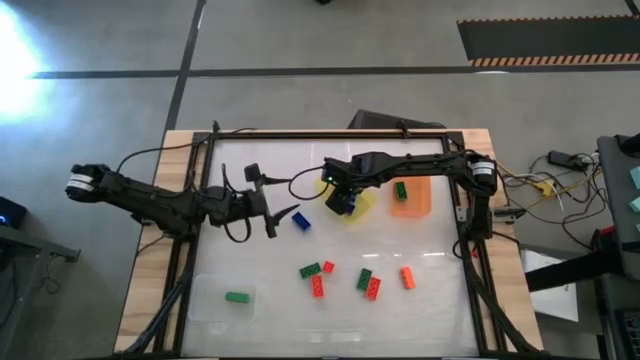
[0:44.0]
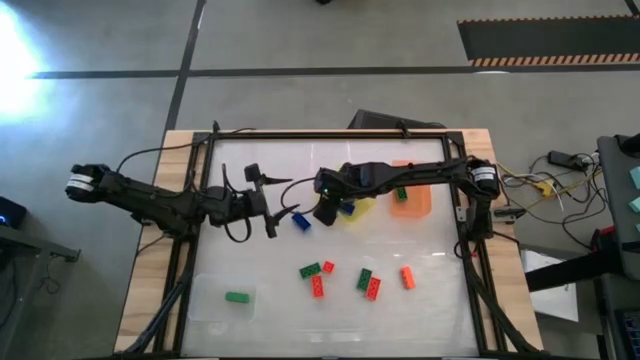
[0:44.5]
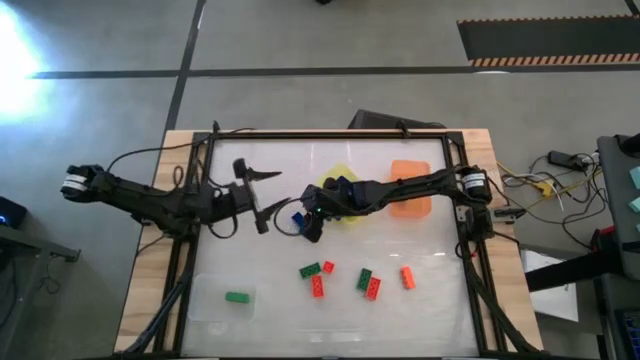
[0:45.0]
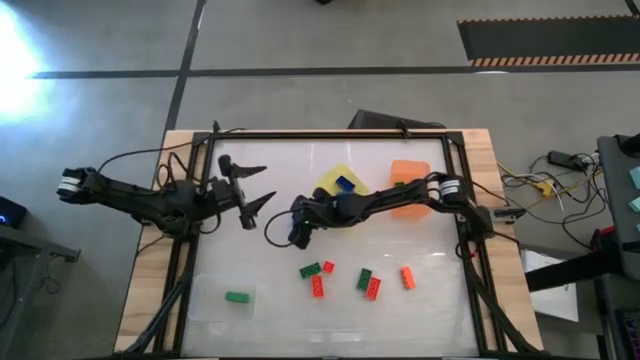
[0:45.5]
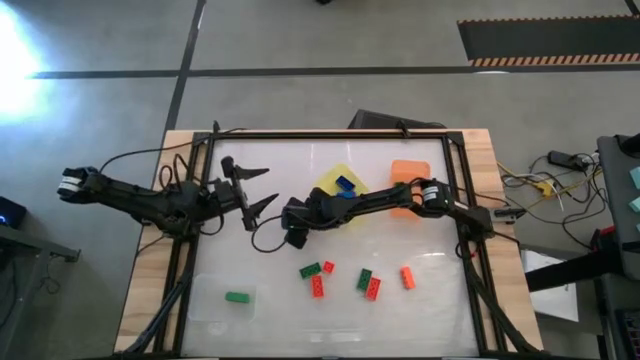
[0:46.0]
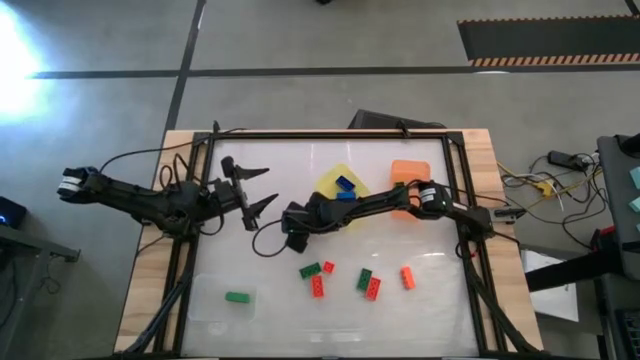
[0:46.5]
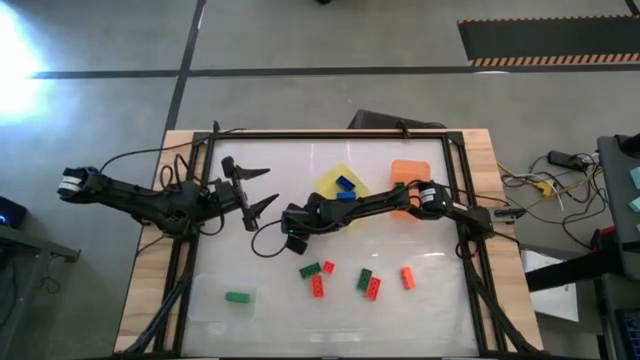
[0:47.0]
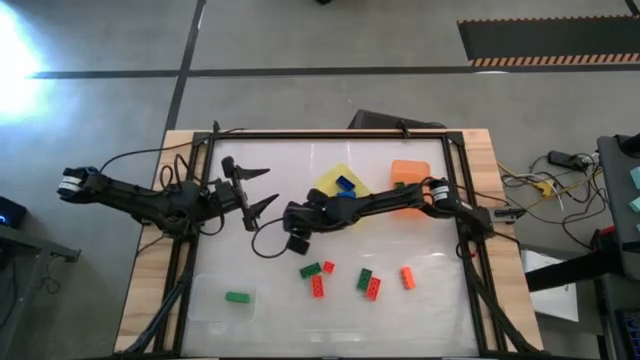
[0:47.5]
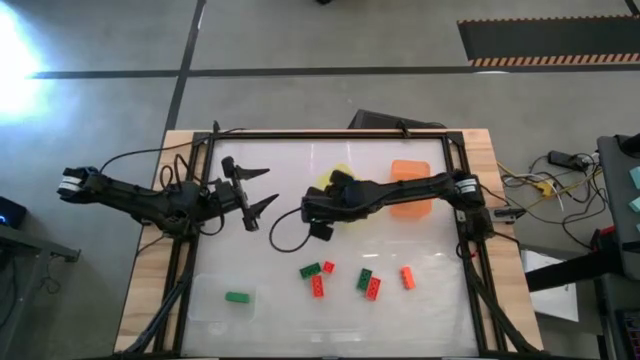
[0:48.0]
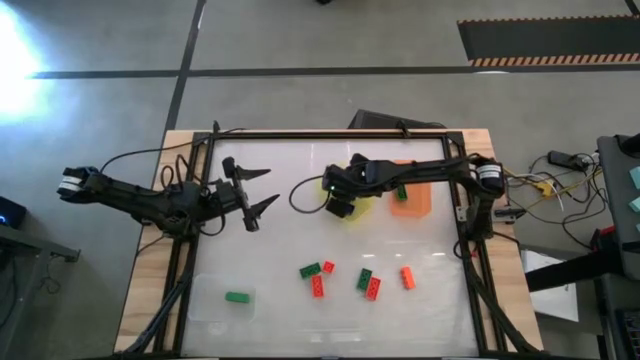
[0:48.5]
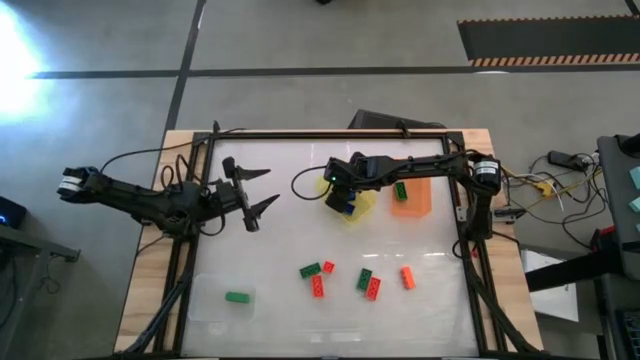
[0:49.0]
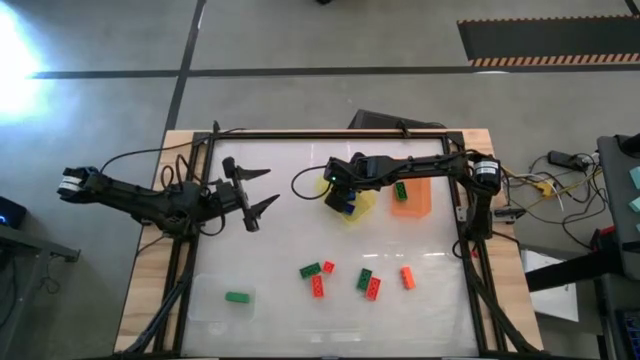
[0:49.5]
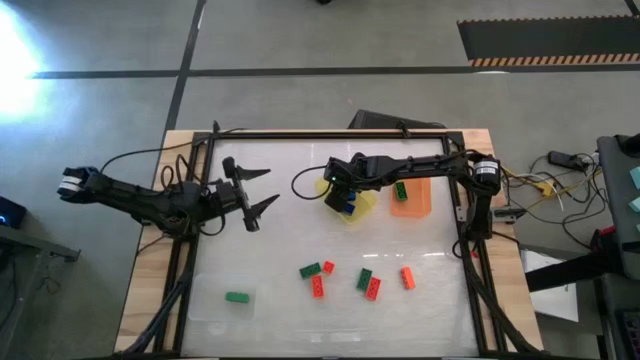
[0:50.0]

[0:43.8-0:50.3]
Task: Sort & place blocks by color
Put the blue game piece into the yellow bin

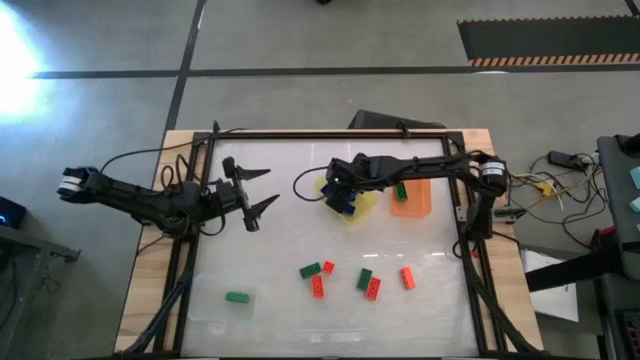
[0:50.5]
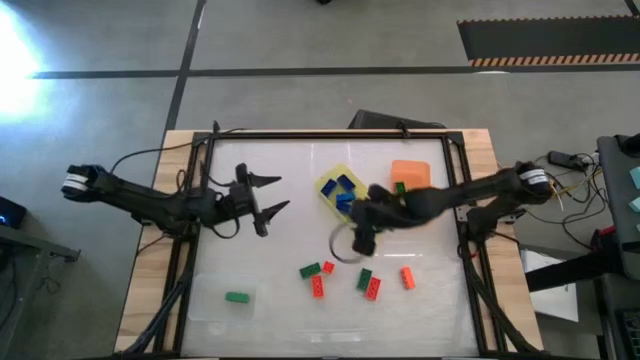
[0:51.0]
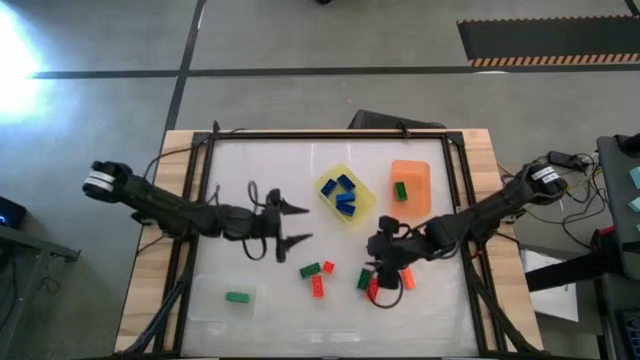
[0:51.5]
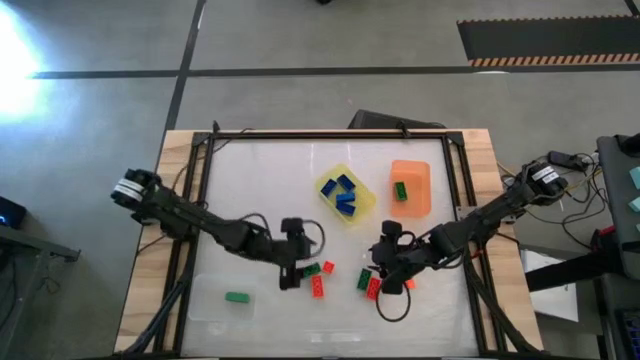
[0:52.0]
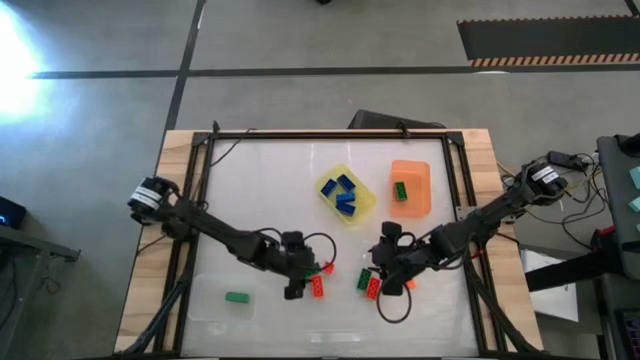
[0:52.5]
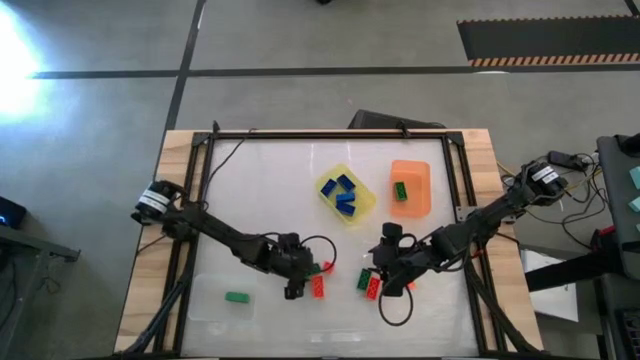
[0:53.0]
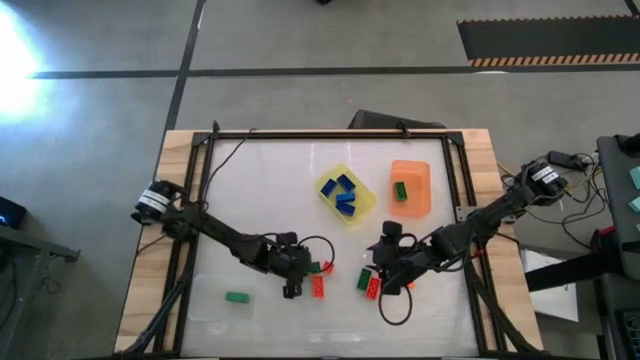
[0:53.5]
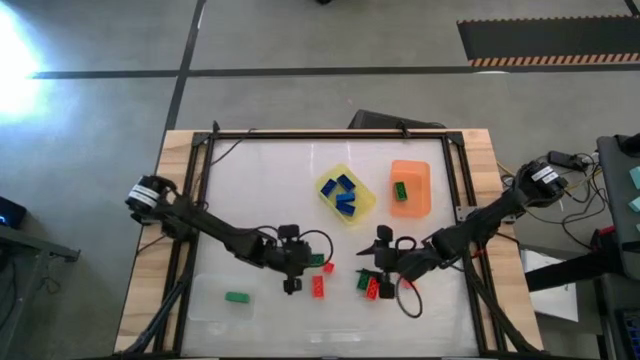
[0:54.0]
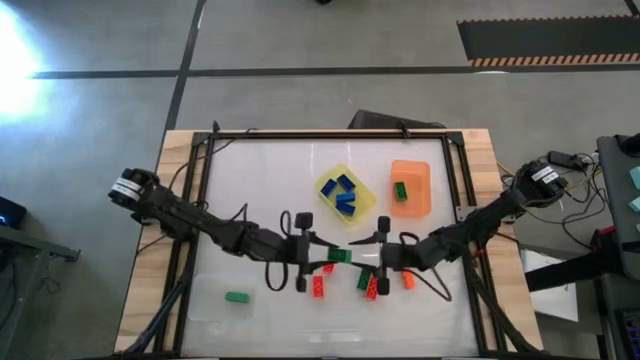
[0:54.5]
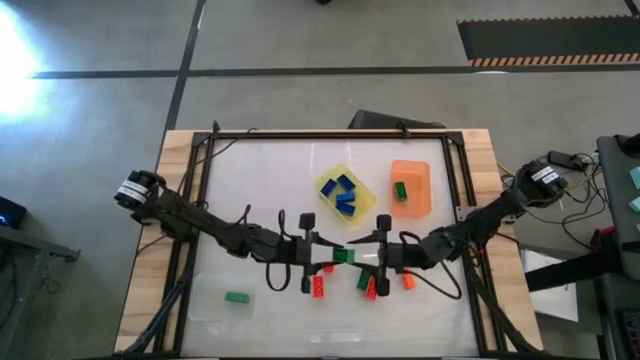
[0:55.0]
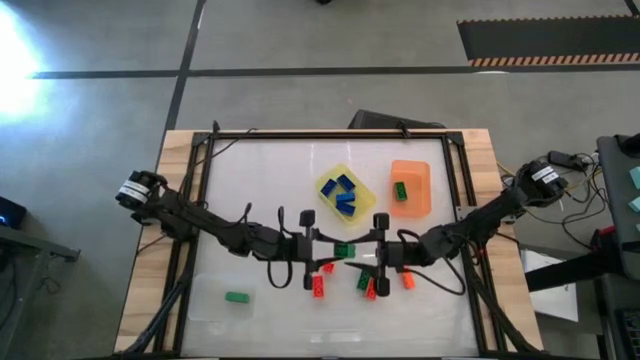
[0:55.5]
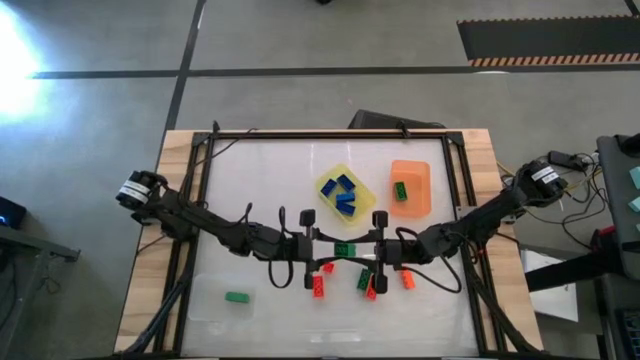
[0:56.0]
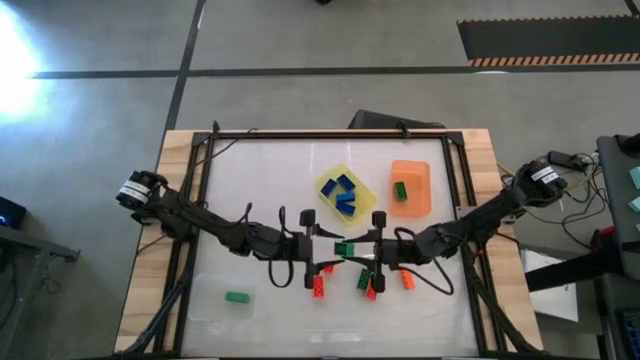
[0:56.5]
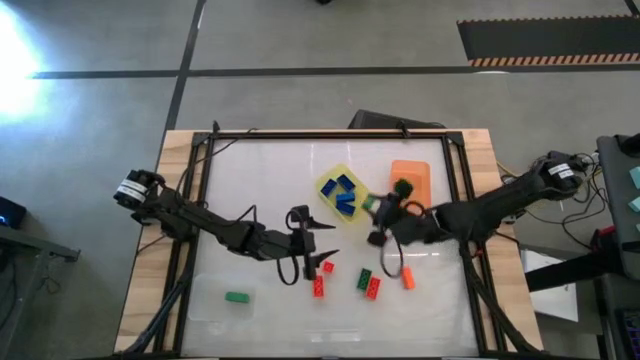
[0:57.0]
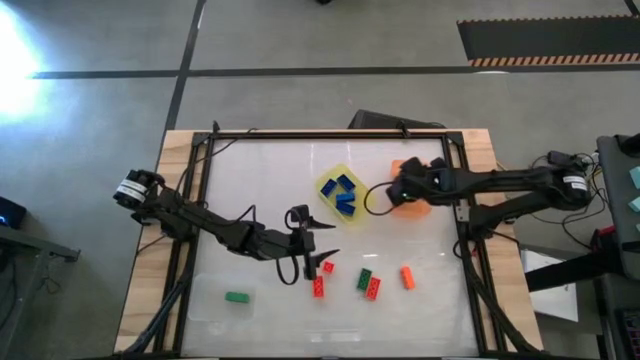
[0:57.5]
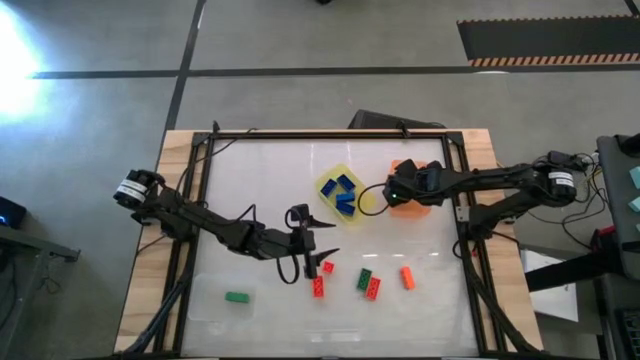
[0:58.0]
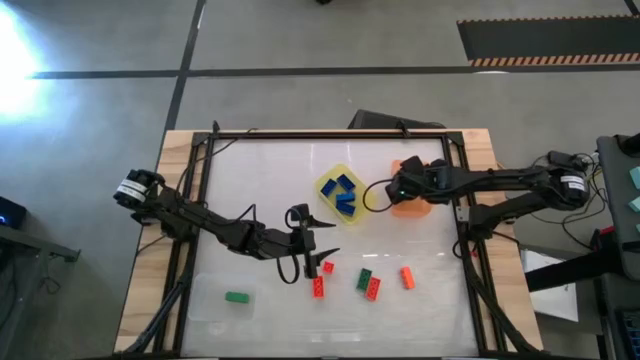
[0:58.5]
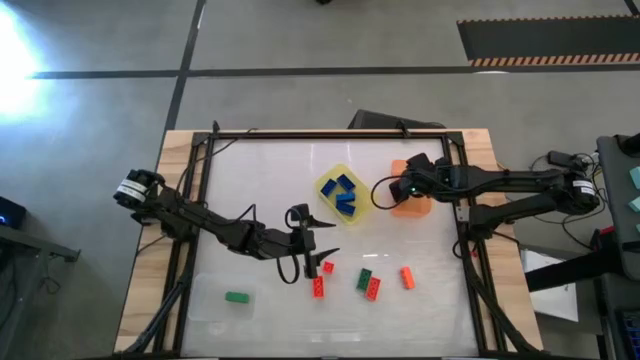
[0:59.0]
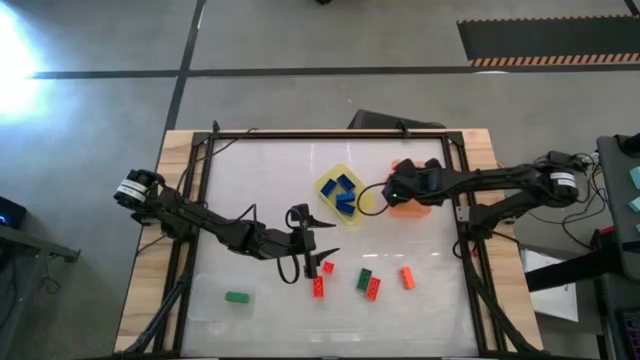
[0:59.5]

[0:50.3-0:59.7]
Put the green game piece into the orange bin

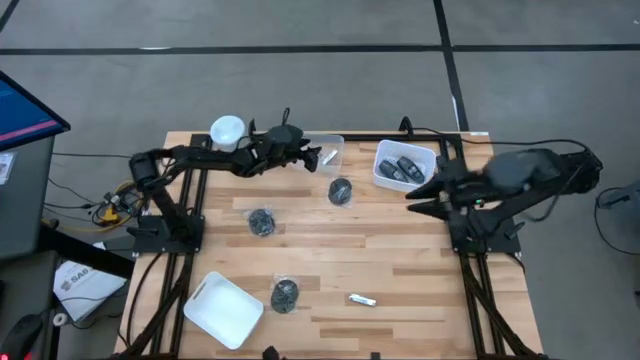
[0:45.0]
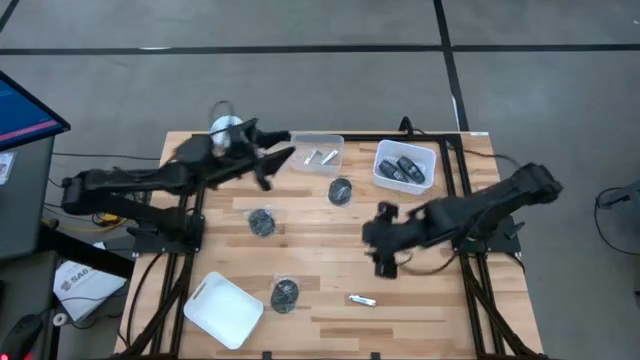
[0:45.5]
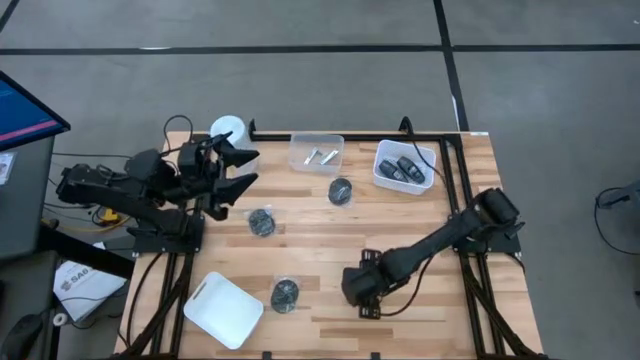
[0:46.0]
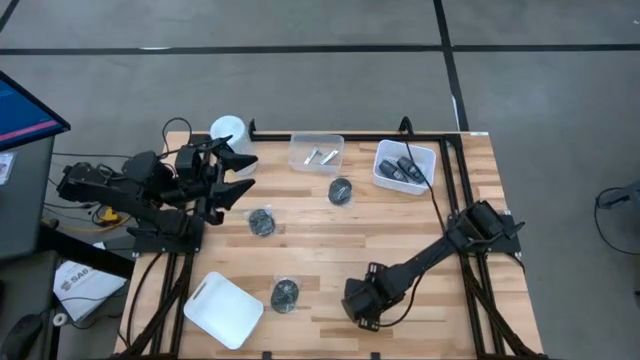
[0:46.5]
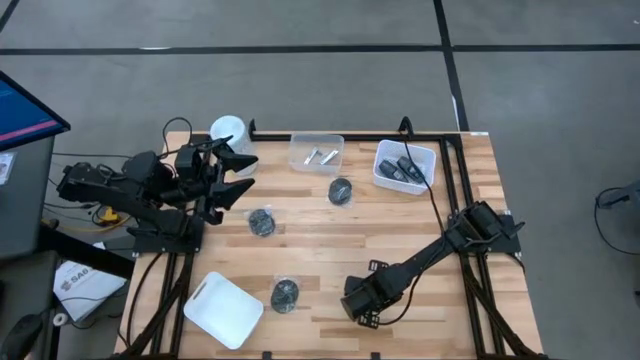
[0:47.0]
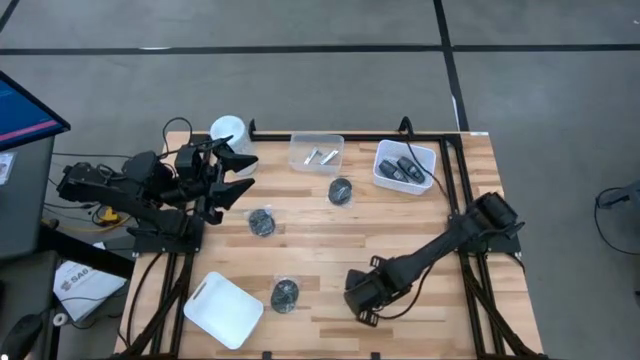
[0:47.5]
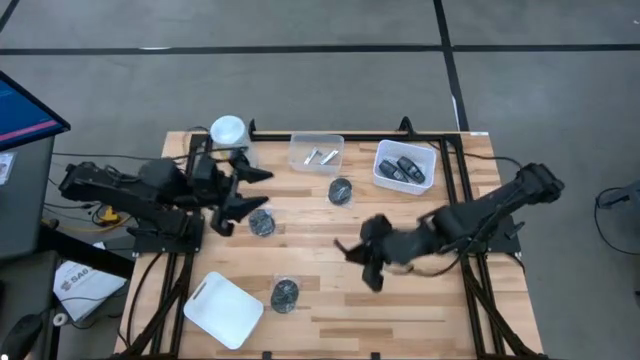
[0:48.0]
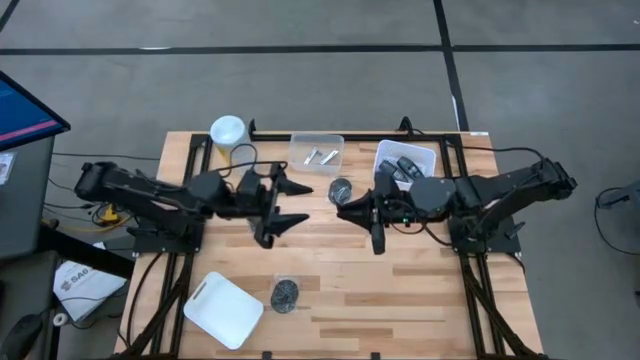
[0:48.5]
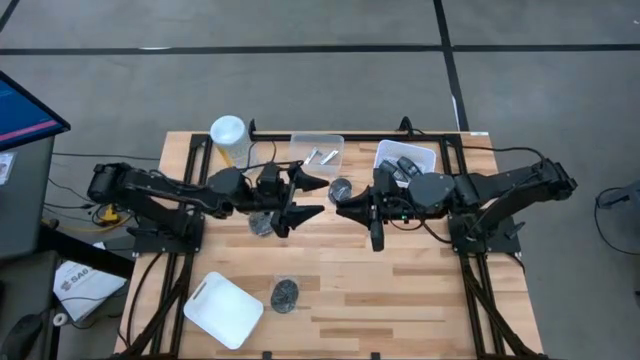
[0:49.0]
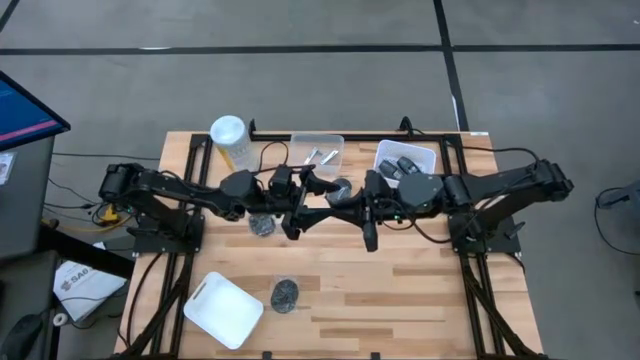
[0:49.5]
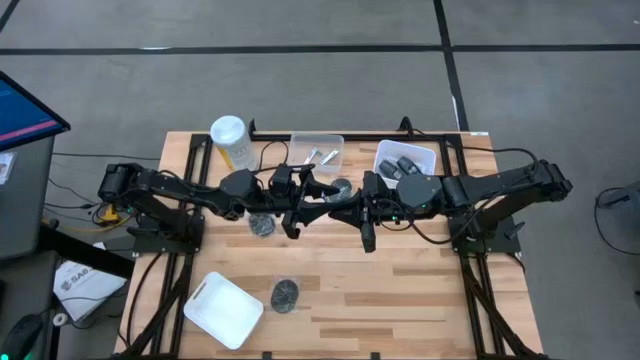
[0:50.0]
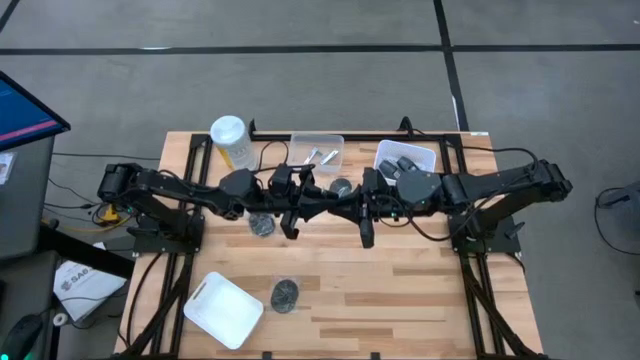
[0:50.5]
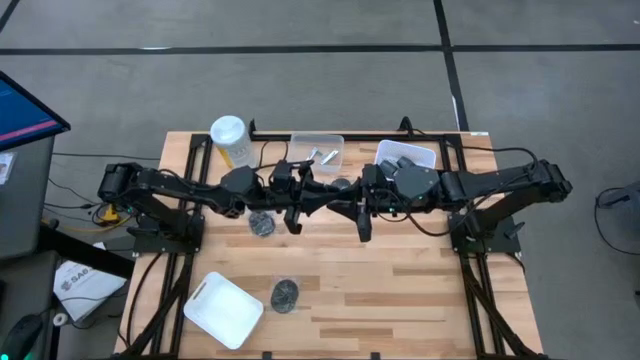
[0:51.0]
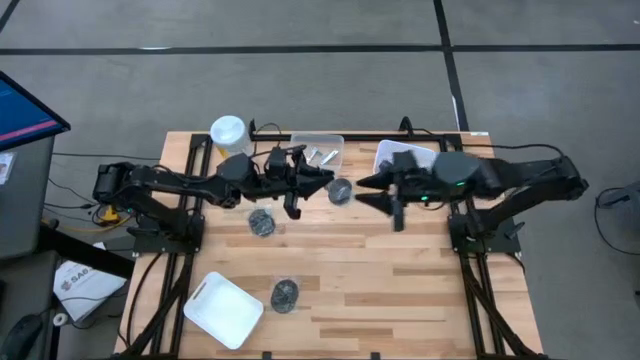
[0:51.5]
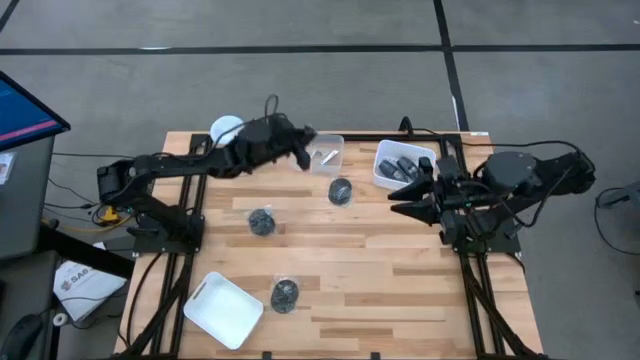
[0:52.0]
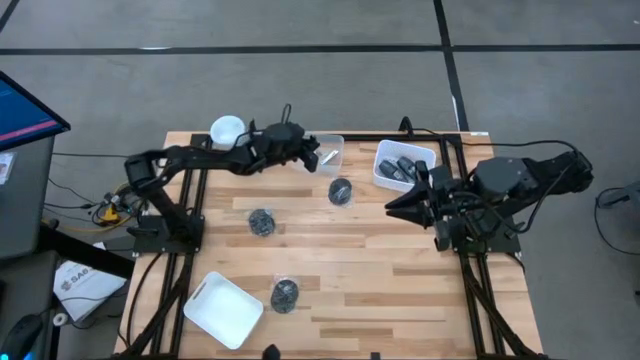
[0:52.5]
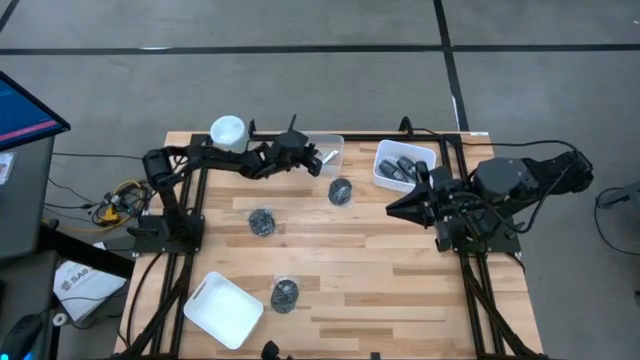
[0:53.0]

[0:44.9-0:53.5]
Task: Pick & Place Travel size toiletries
Put the silver nail cutter into the transparent bin
